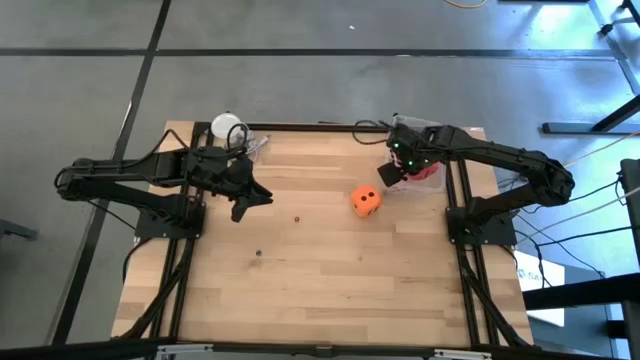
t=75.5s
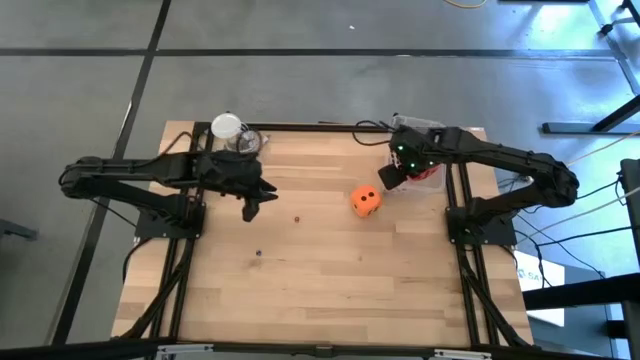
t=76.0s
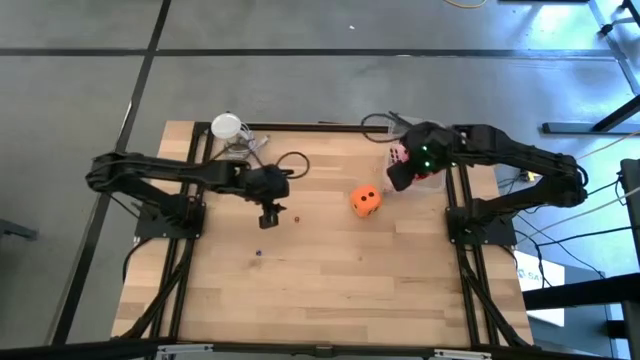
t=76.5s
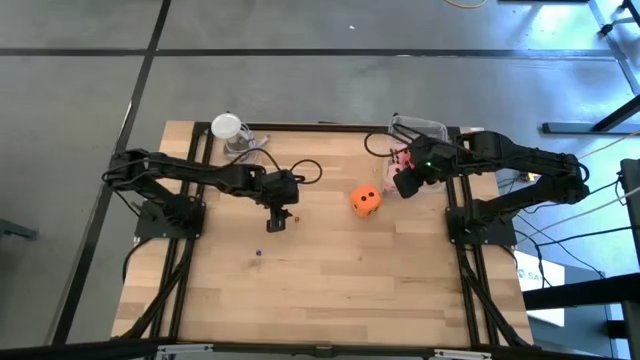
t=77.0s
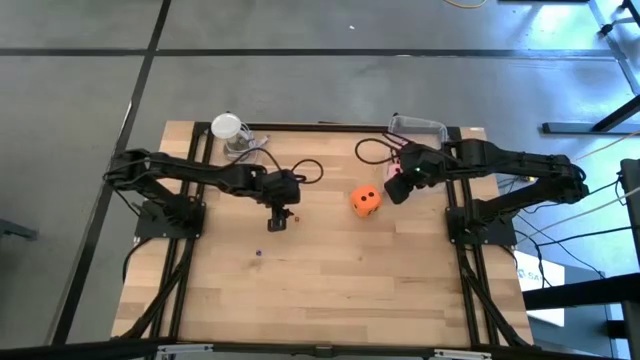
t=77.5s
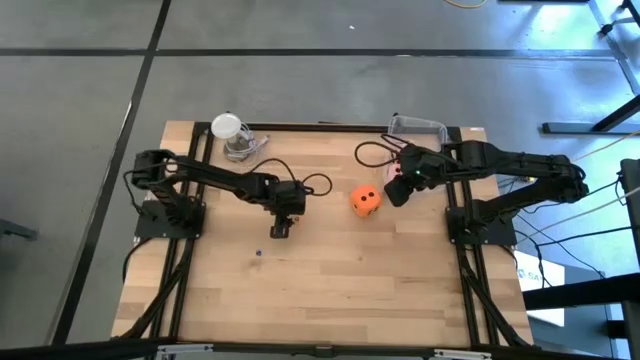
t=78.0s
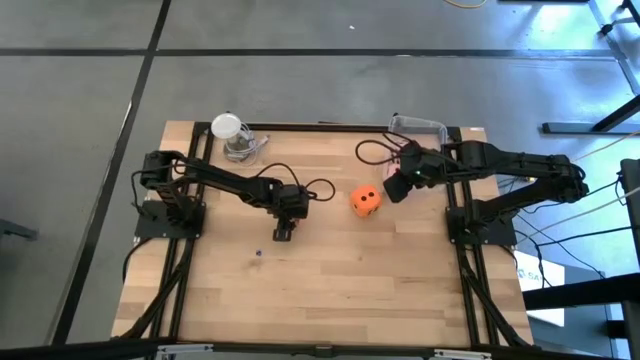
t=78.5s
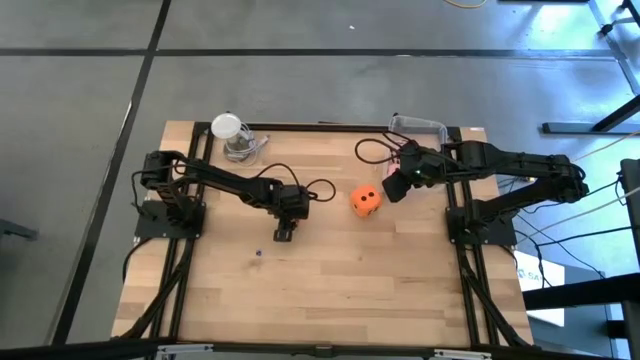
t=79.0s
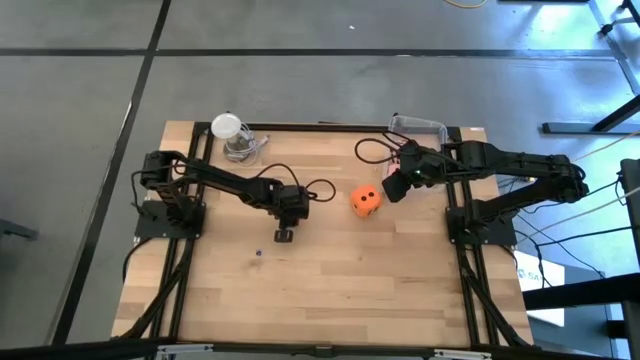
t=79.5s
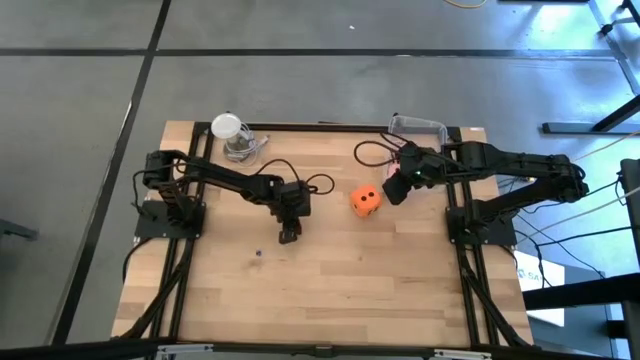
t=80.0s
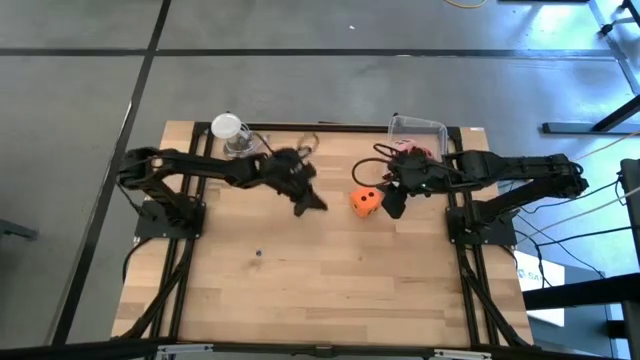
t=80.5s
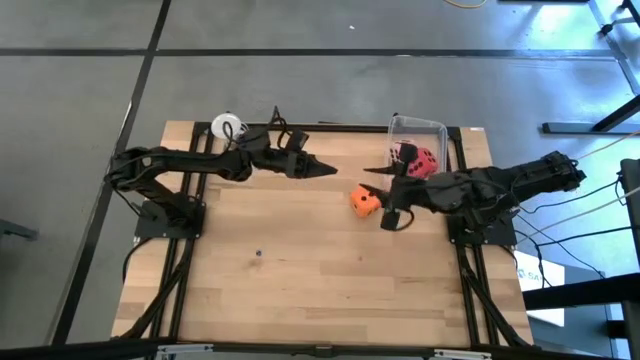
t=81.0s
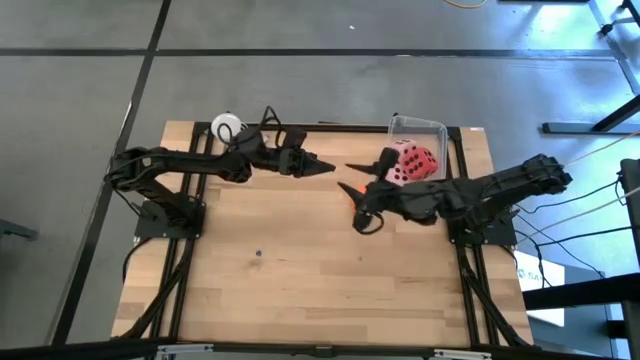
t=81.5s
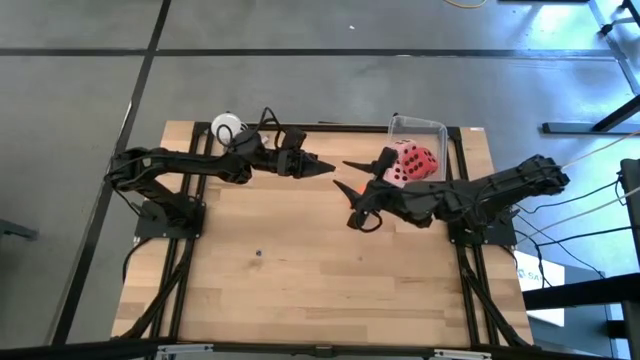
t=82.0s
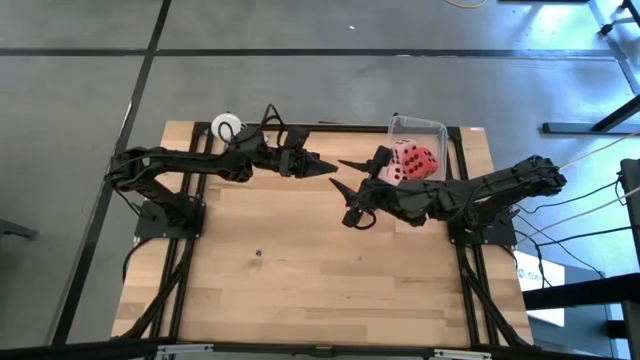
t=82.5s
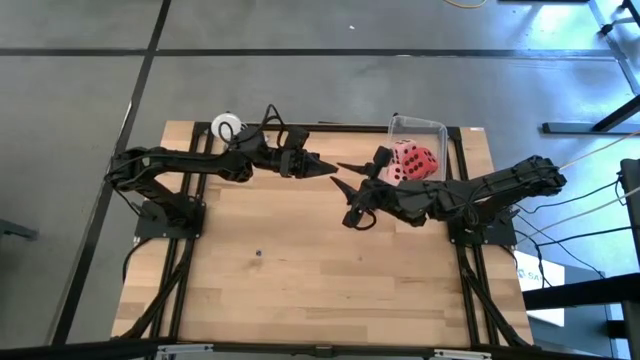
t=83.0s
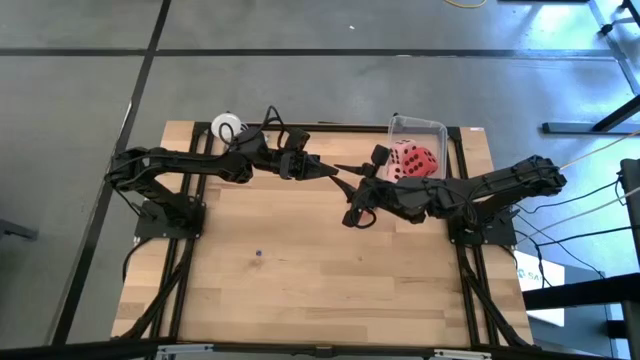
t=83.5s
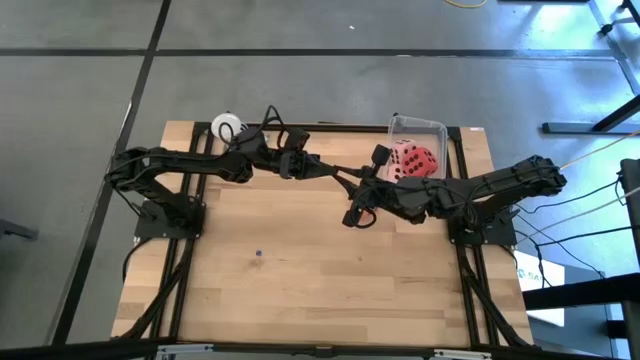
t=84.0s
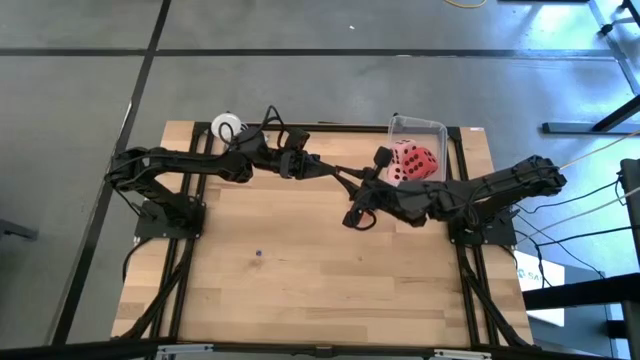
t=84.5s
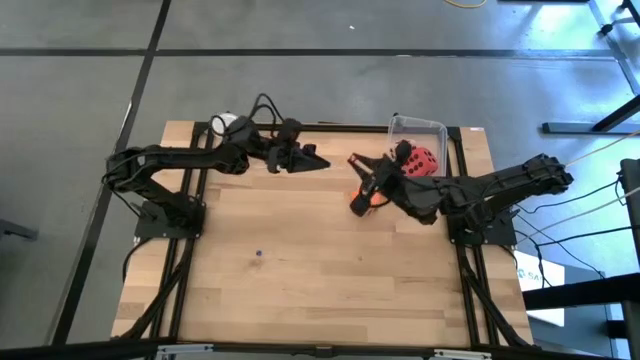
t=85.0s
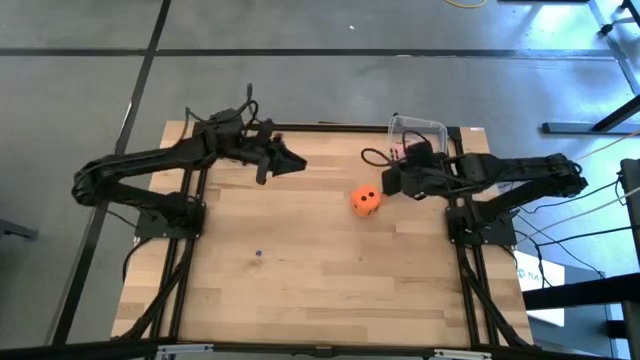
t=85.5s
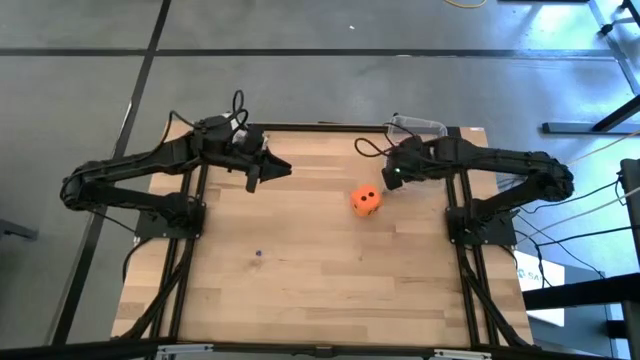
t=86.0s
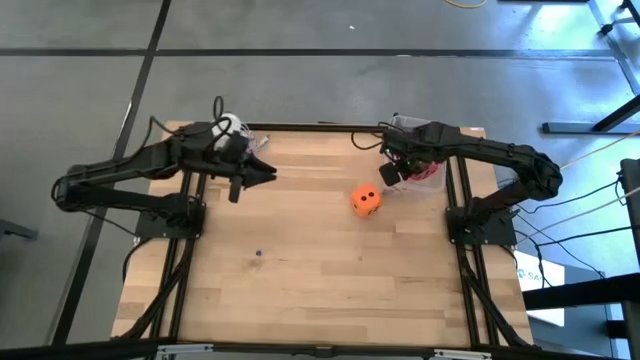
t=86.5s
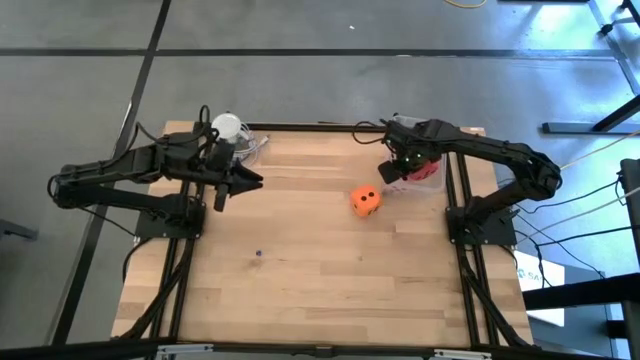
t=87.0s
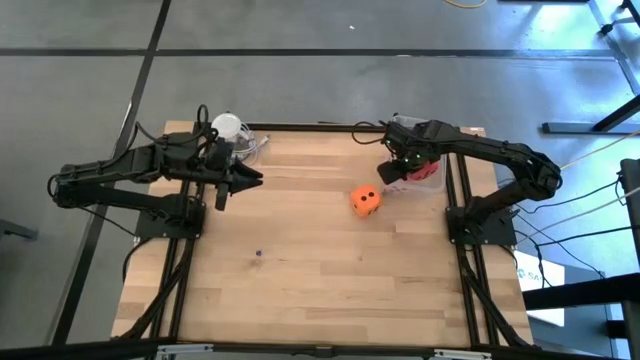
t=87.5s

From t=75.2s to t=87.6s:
Task: Pick & Place Dice
Put the small red die into the container

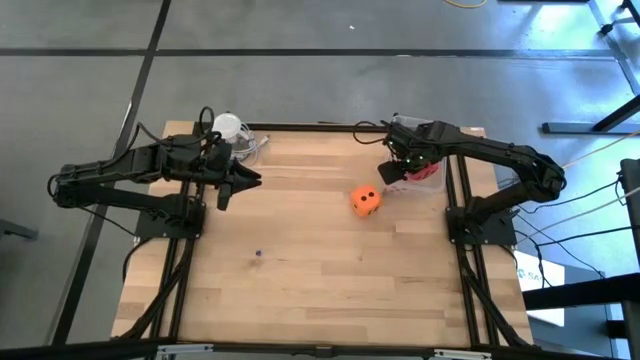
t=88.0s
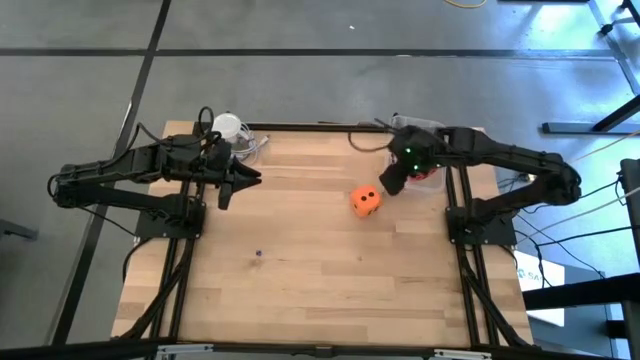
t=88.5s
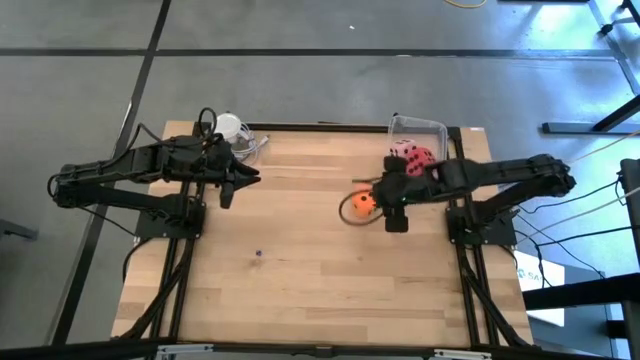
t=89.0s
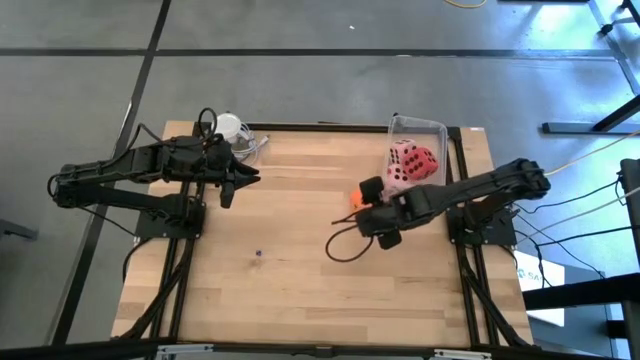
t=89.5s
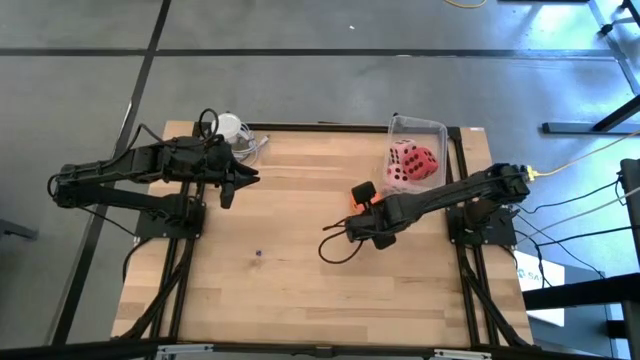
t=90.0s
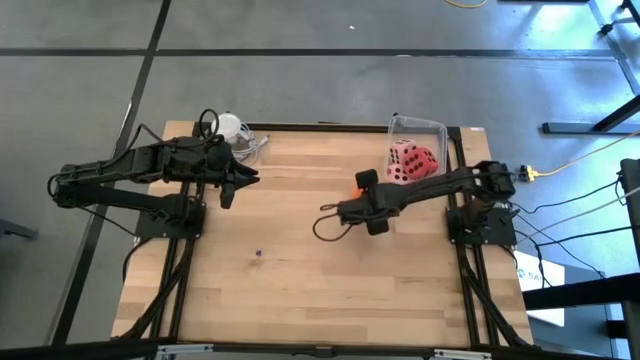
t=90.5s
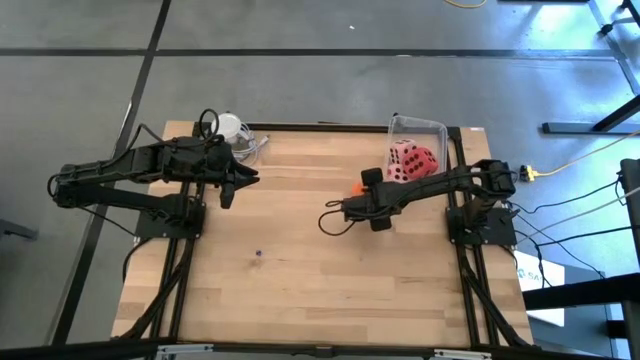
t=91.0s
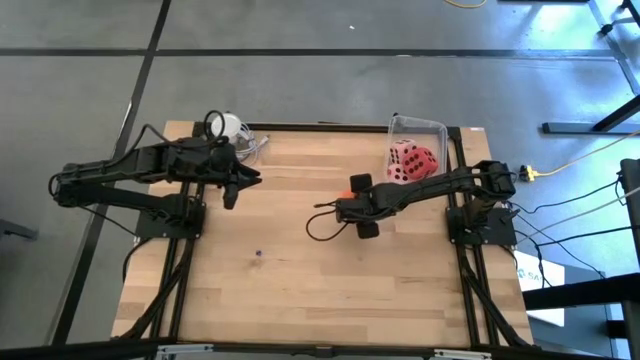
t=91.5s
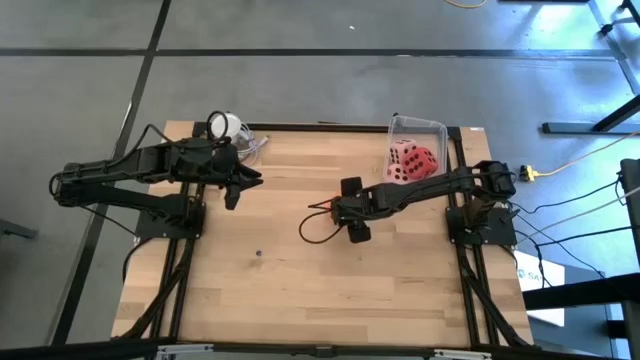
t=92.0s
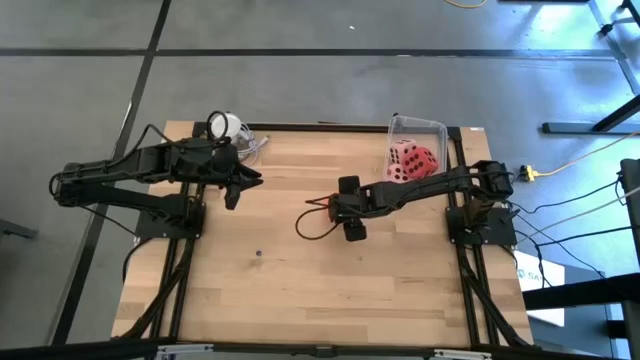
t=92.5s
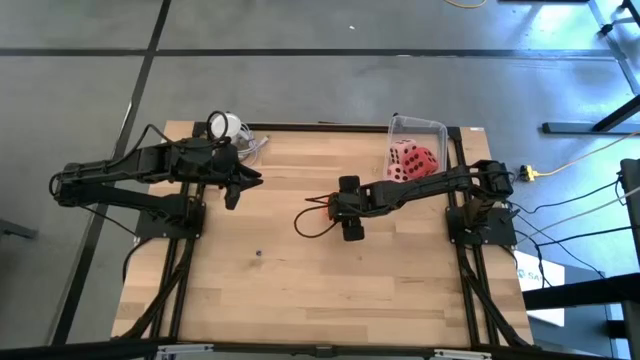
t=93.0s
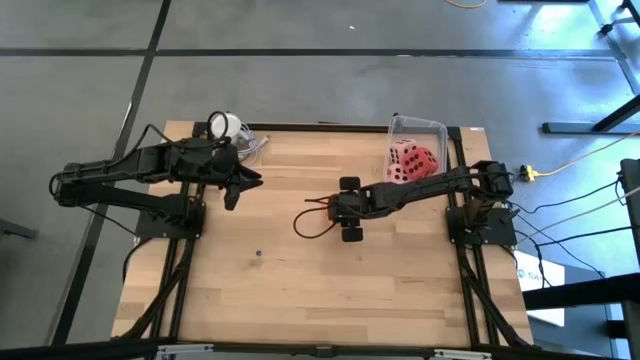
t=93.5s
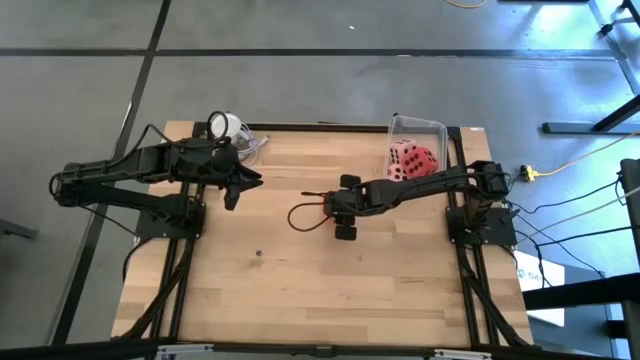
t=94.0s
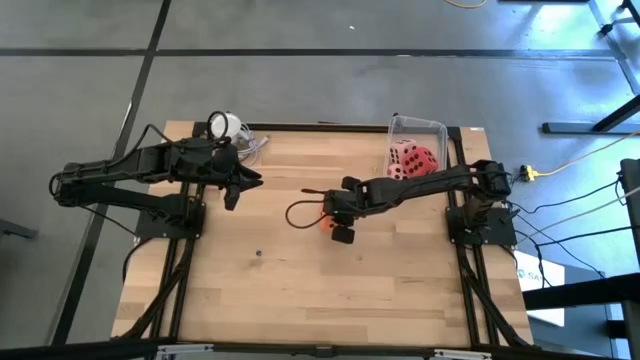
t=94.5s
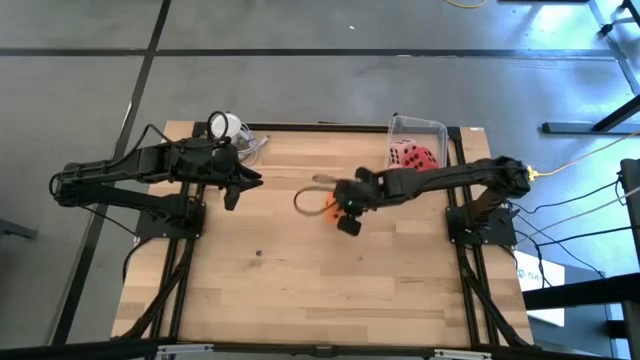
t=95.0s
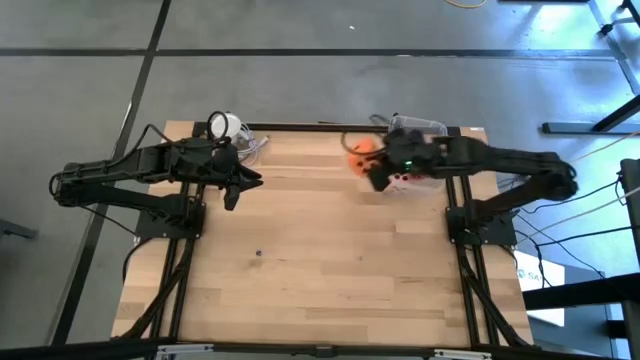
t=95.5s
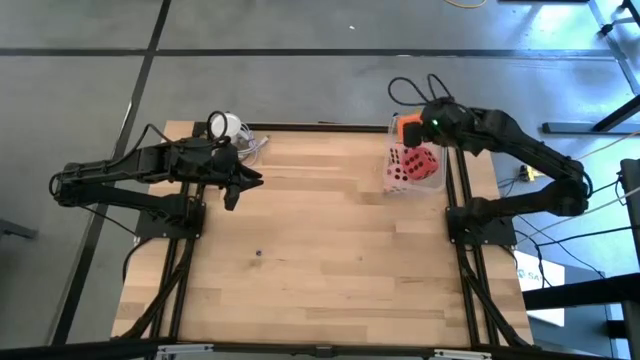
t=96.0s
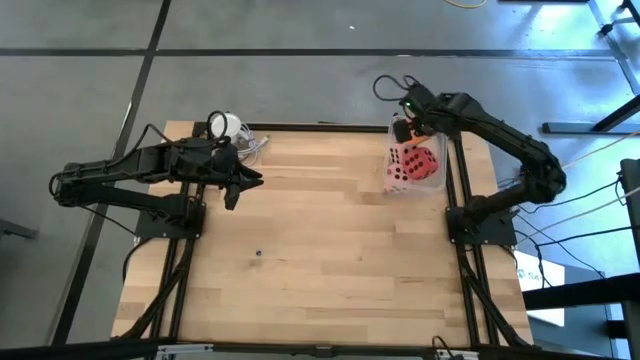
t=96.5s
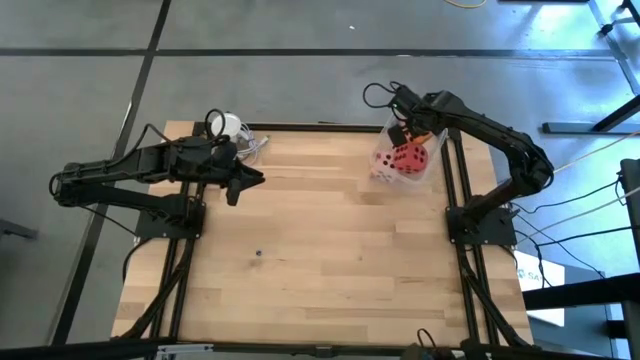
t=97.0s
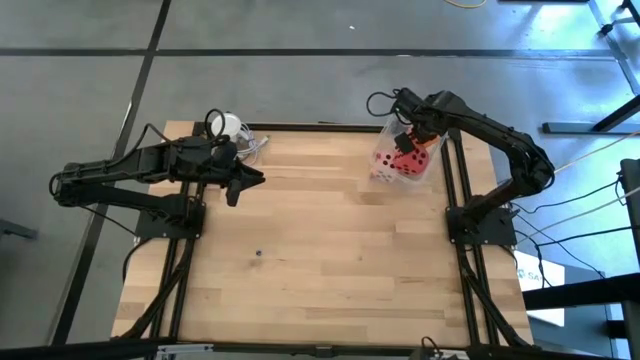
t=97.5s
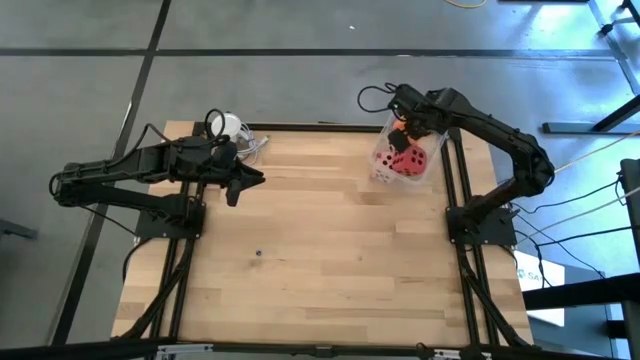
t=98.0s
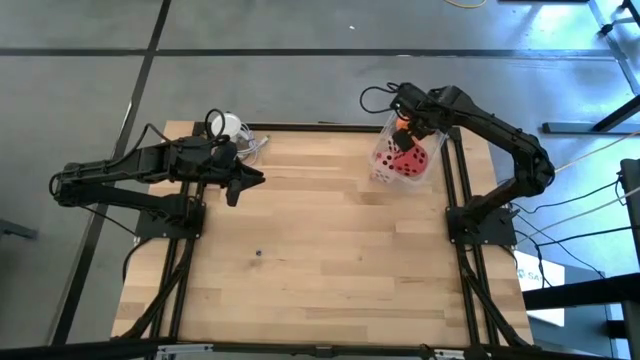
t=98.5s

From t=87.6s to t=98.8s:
Put the large orange die into the container
